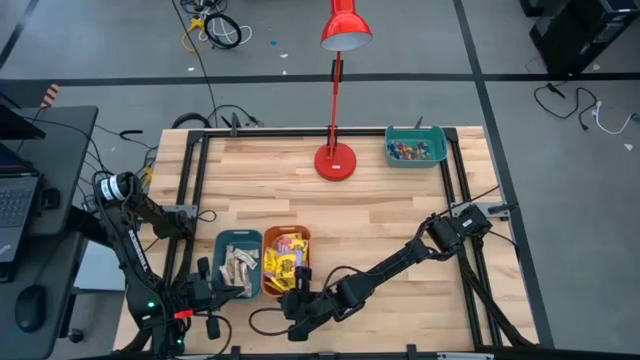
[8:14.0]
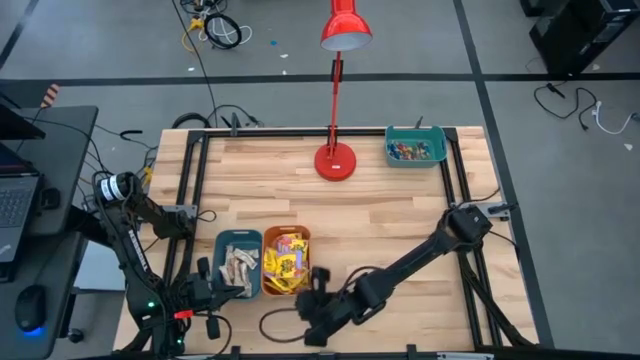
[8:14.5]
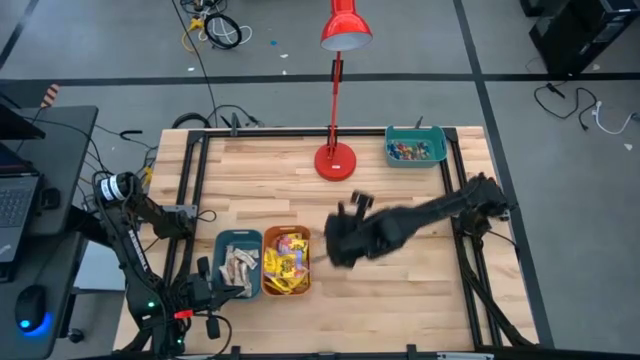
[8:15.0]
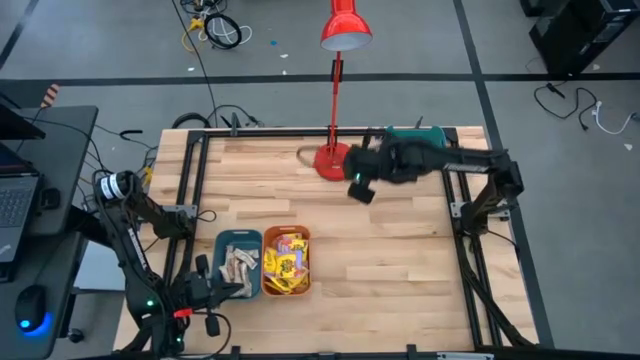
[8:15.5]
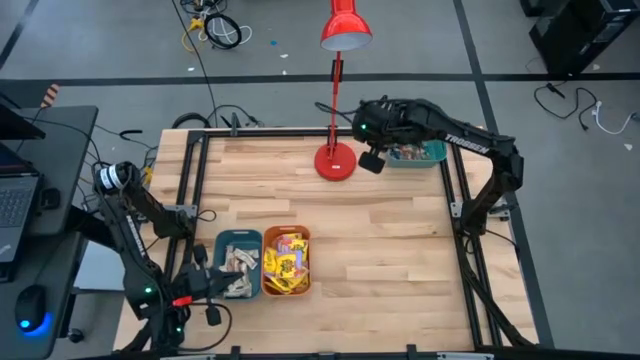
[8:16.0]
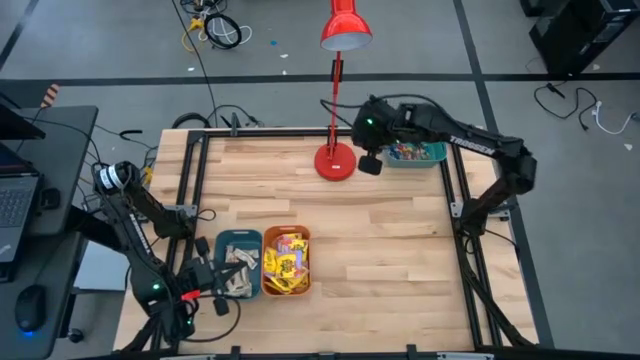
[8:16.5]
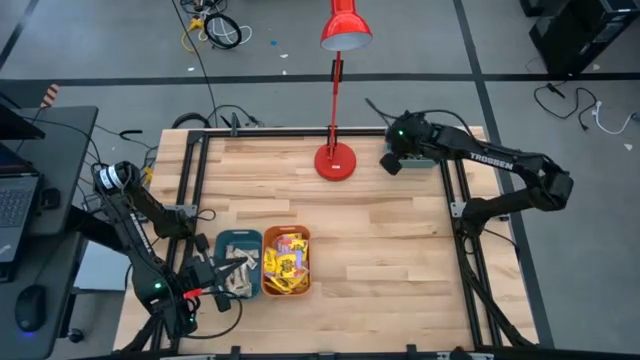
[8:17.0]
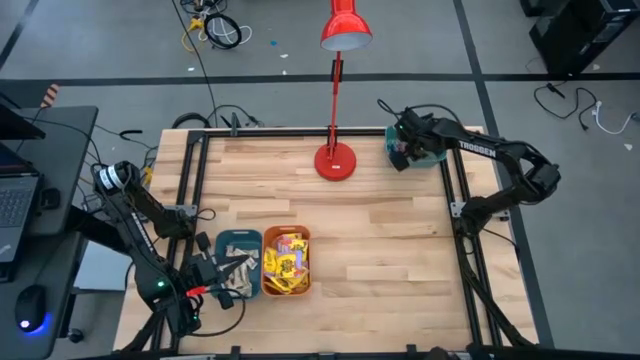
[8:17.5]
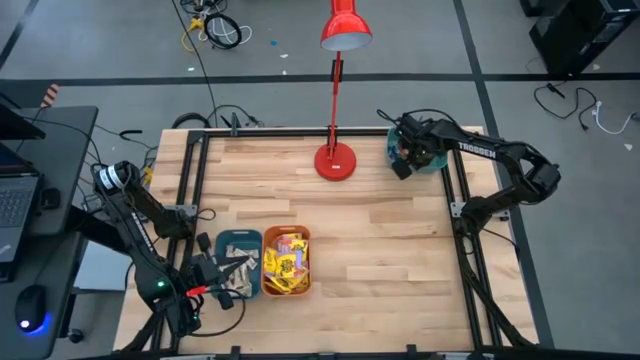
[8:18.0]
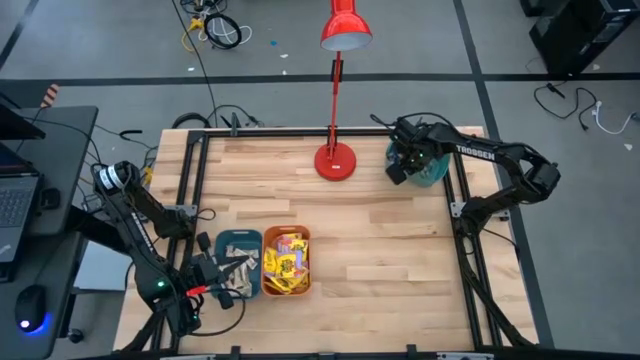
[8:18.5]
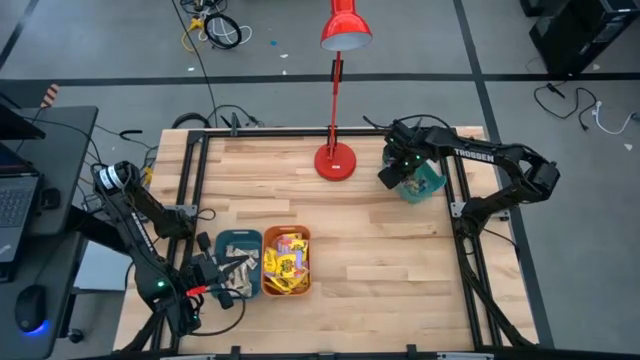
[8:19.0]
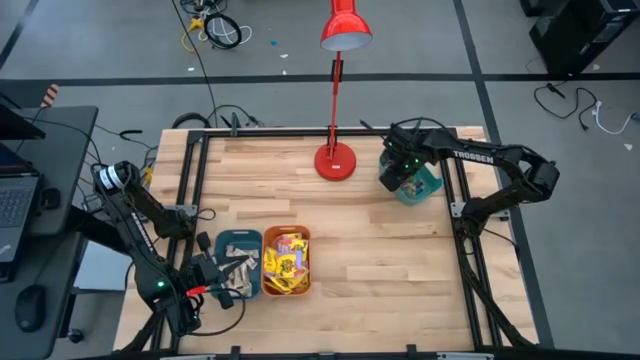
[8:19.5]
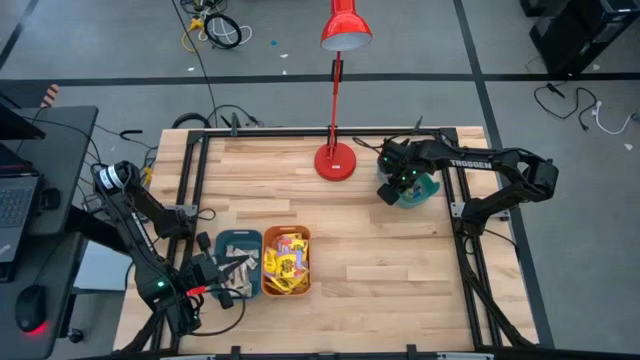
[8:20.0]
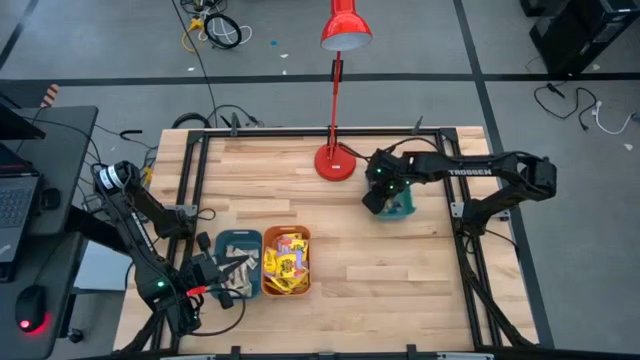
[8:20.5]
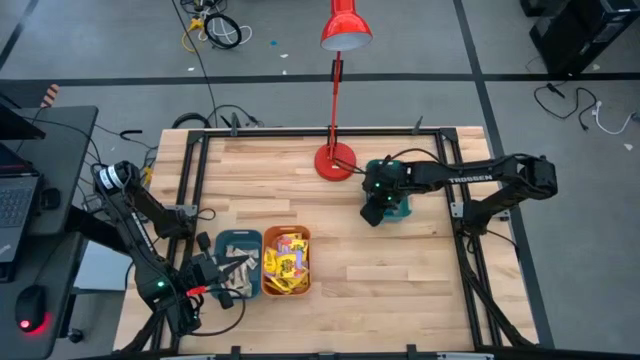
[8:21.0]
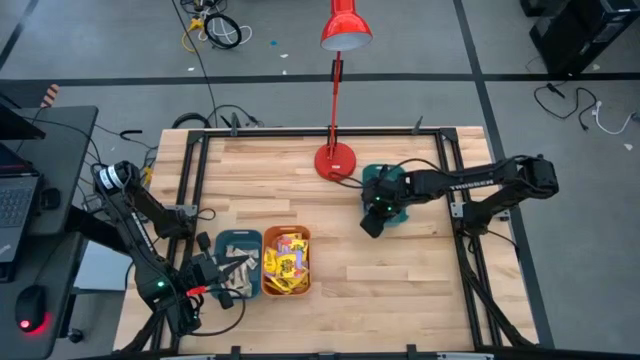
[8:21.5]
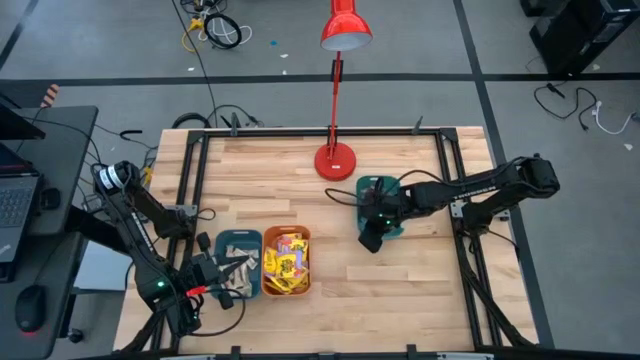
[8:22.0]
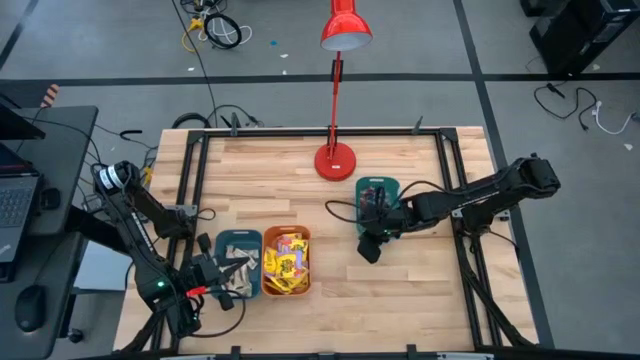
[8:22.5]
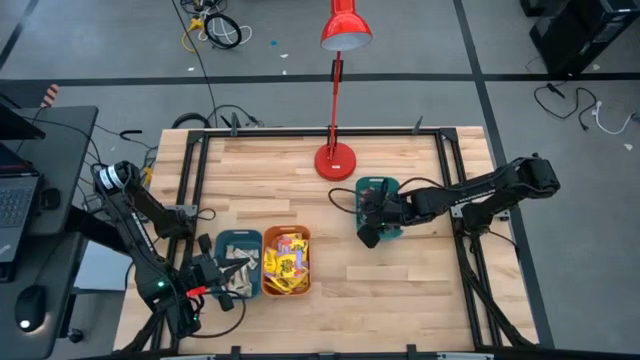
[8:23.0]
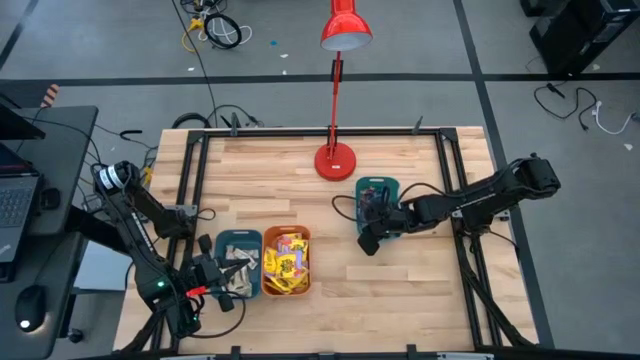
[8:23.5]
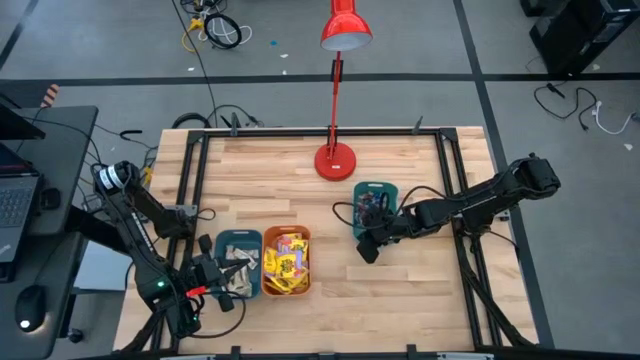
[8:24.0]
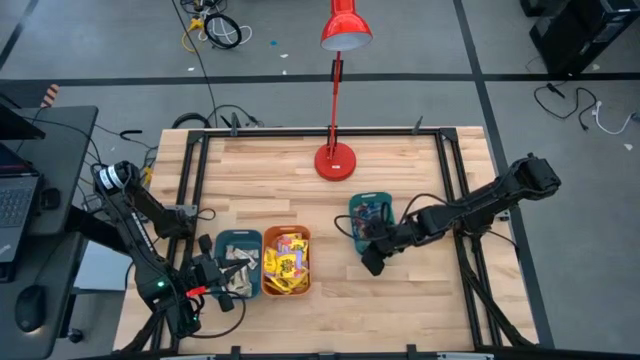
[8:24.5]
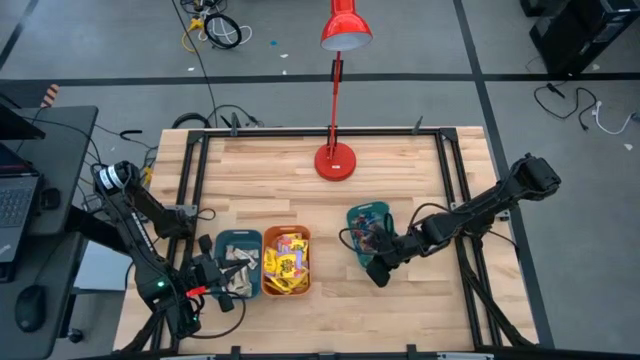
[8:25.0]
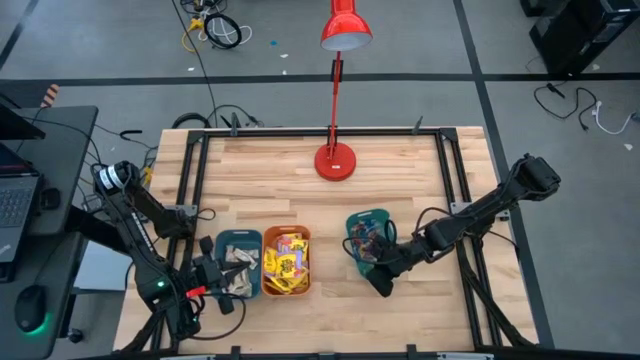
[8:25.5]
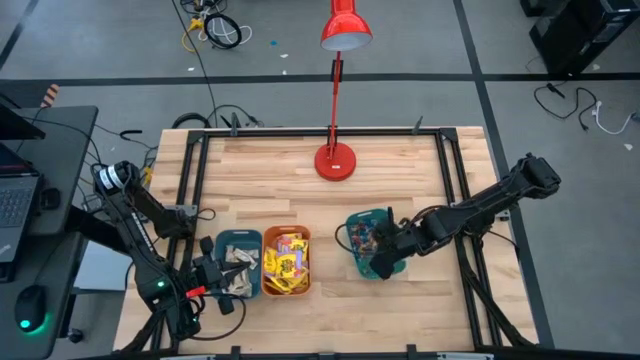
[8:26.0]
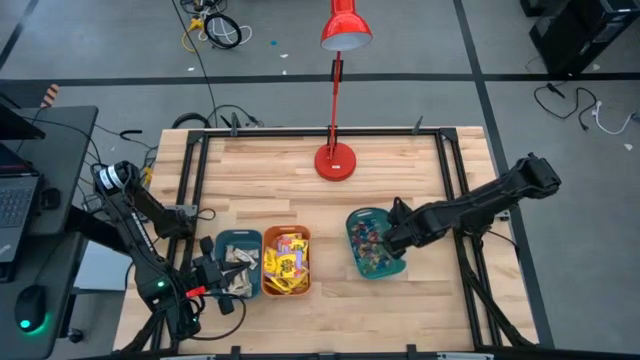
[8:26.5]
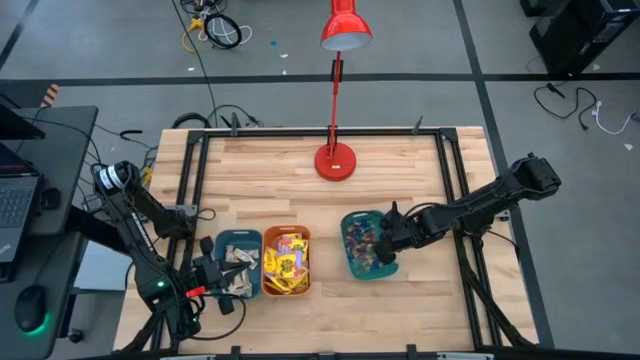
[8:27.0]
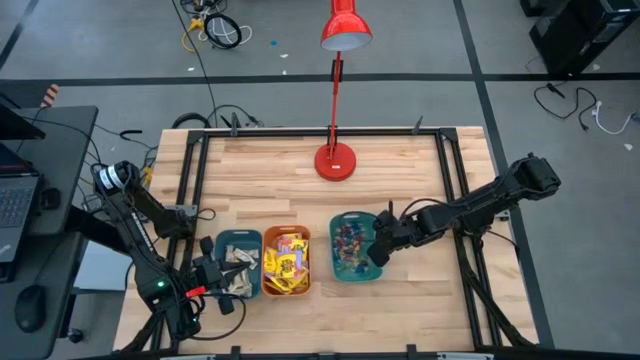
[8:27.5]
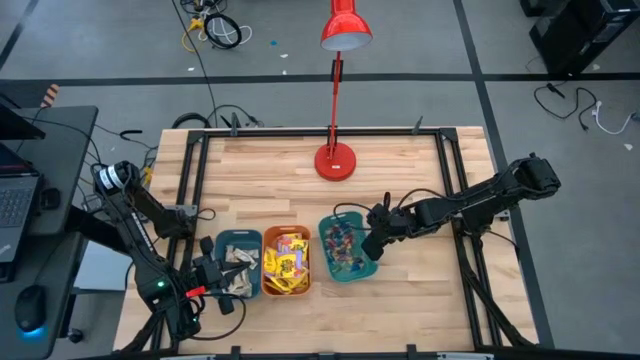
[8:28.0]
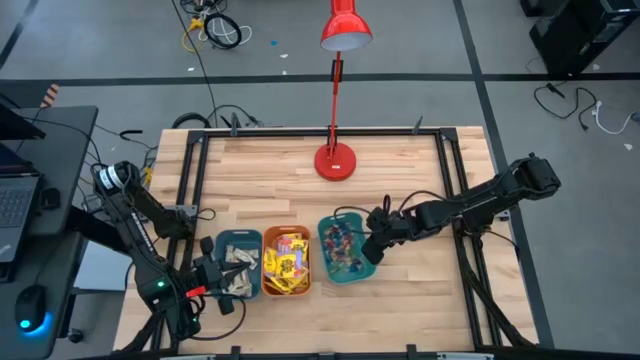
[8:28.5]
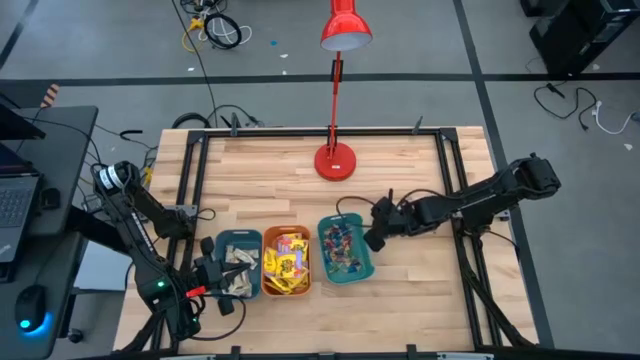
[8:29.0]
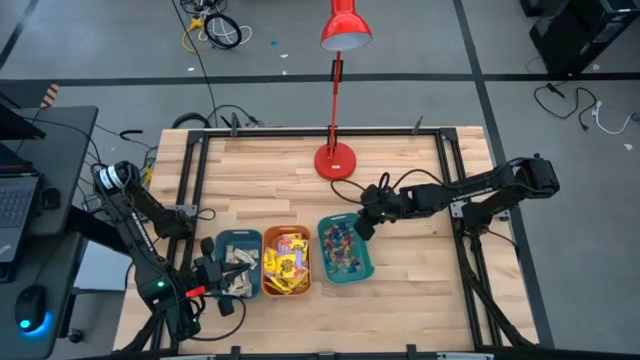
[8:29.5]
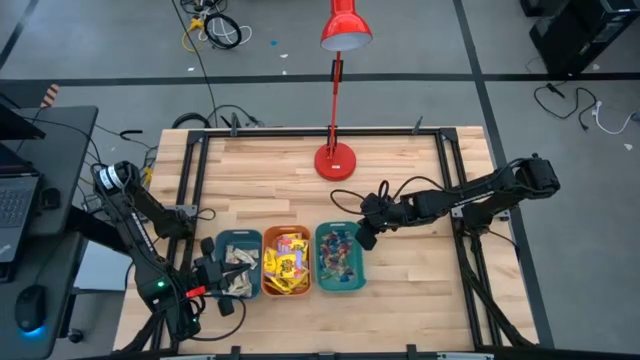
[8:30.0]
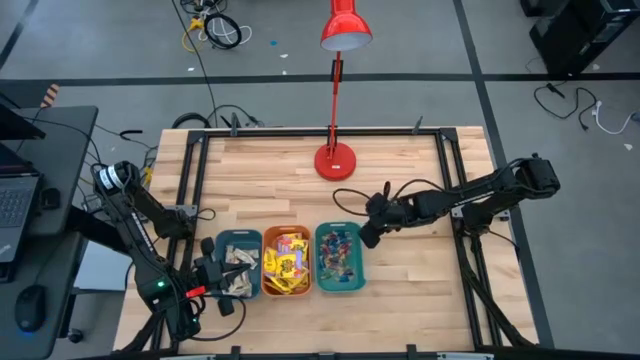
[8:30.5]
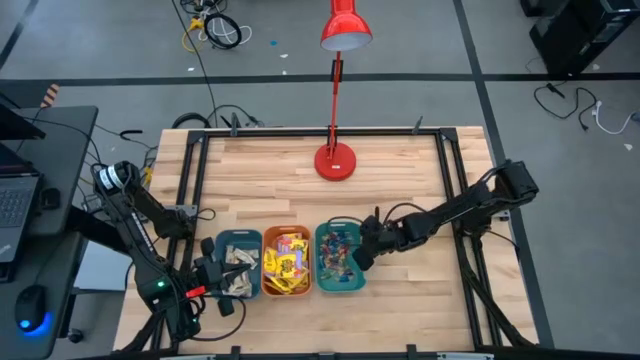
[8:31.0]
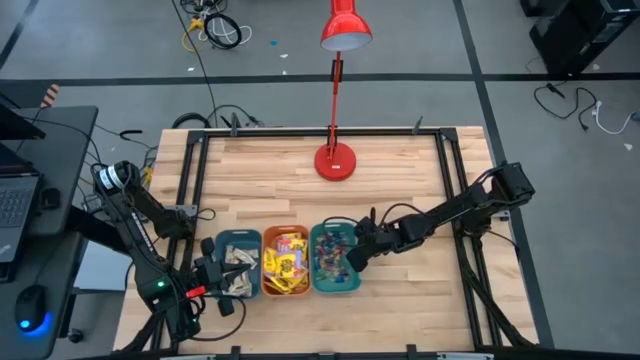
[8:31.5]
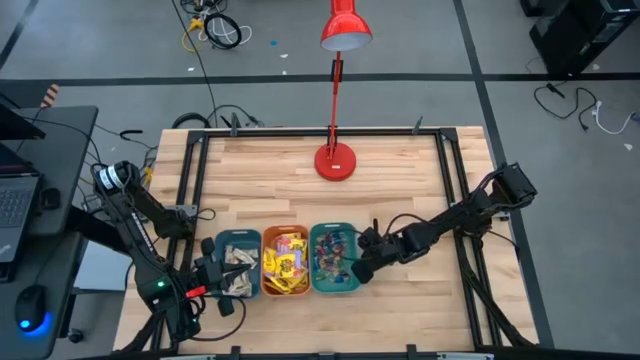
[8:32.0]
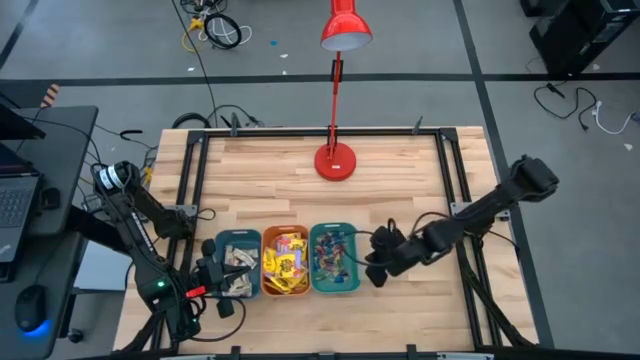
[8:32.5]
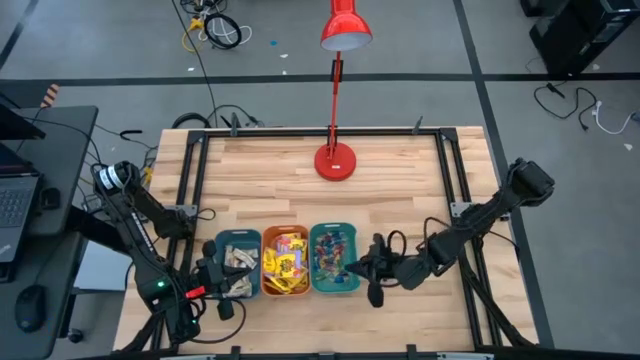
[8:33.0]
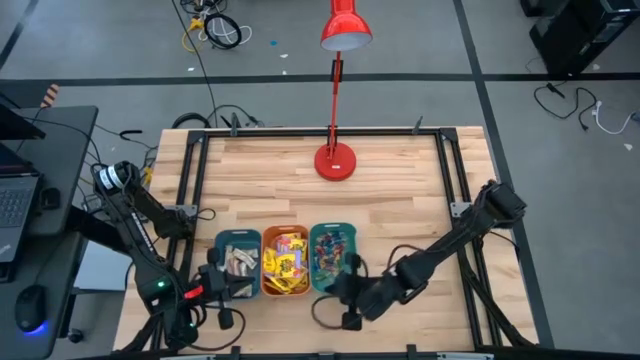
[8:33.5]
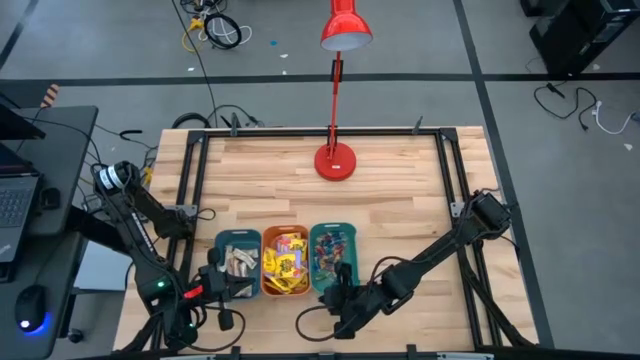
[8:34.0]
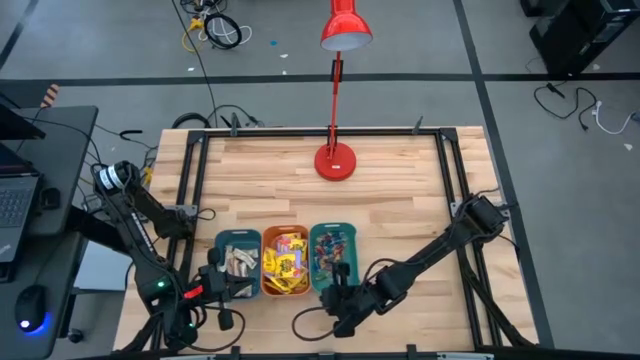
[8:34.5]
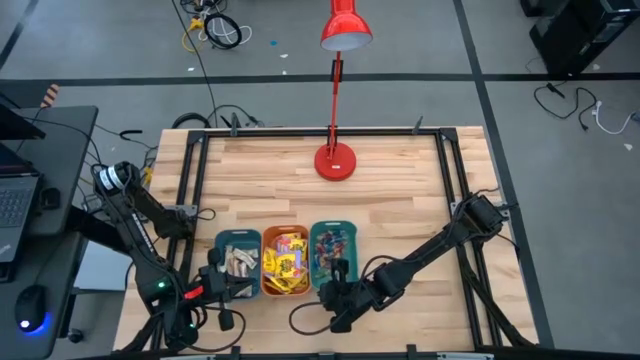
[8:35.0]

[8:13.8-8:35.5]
Task: Sort candy
Move the green bin to the right of the orange bin
